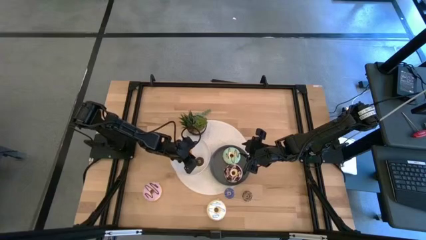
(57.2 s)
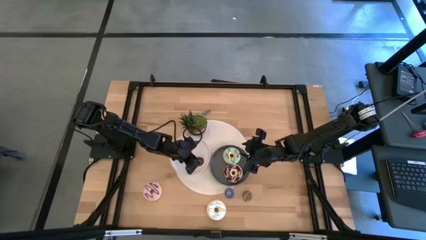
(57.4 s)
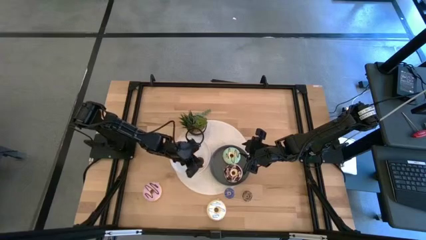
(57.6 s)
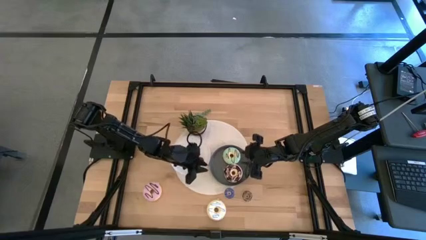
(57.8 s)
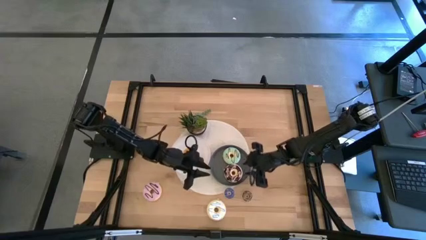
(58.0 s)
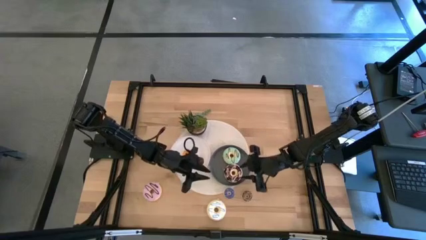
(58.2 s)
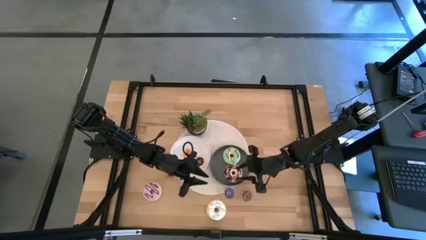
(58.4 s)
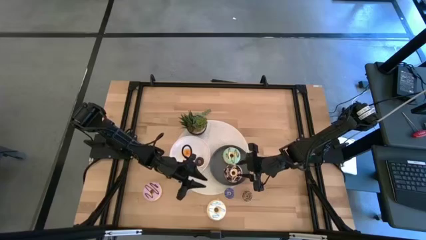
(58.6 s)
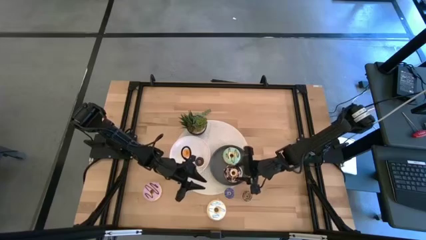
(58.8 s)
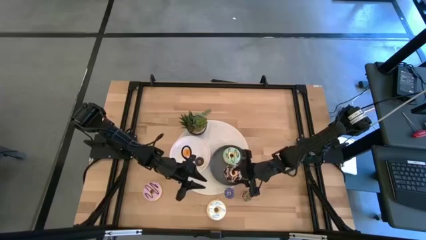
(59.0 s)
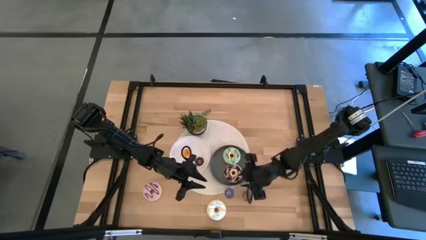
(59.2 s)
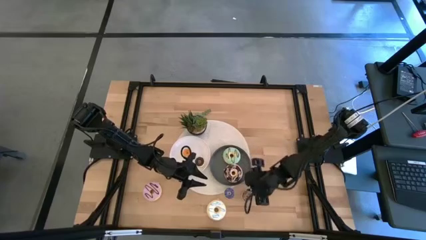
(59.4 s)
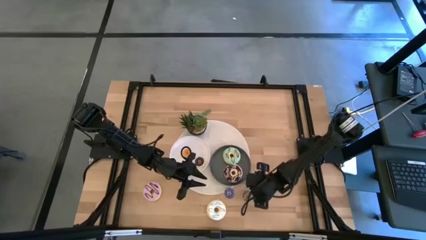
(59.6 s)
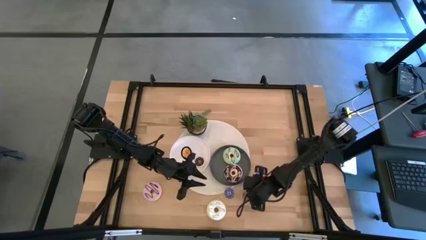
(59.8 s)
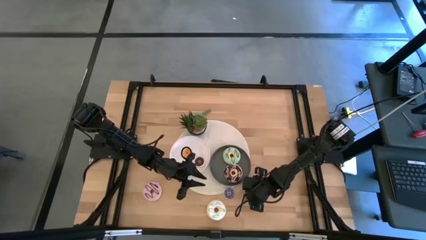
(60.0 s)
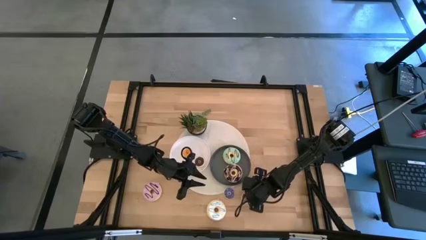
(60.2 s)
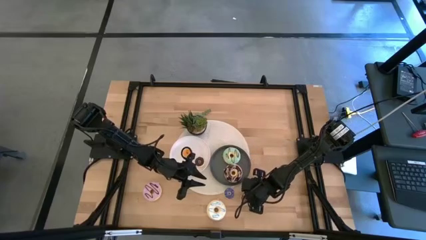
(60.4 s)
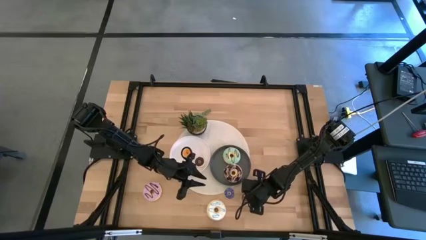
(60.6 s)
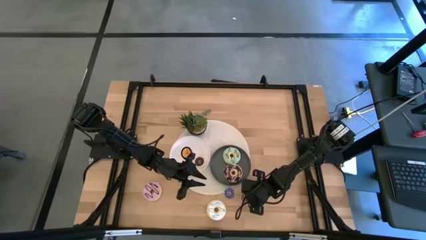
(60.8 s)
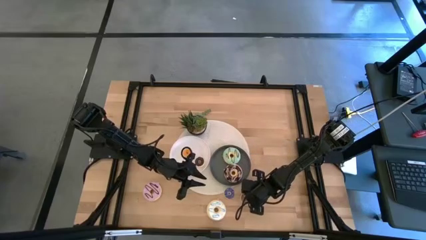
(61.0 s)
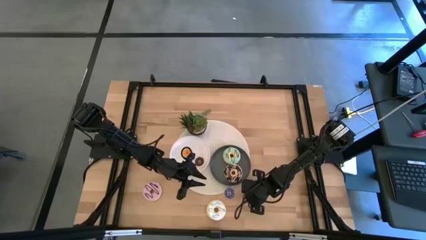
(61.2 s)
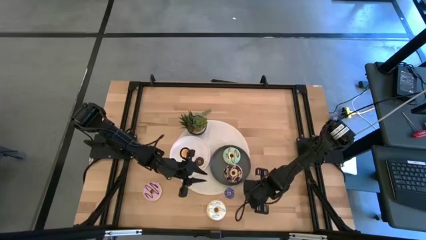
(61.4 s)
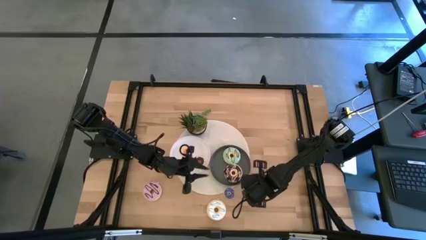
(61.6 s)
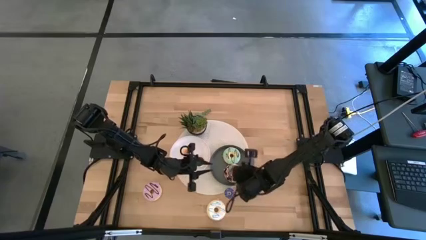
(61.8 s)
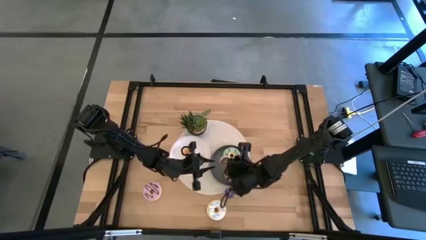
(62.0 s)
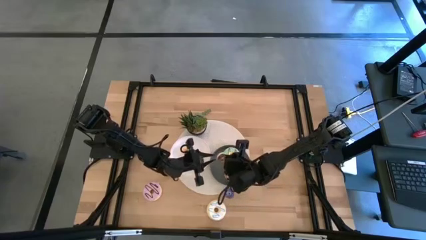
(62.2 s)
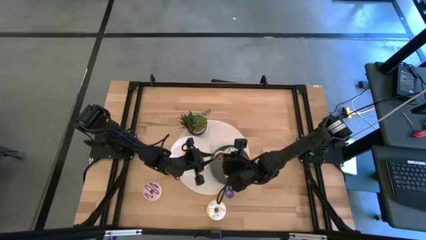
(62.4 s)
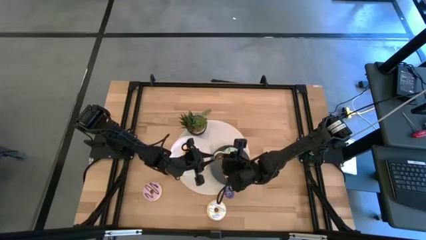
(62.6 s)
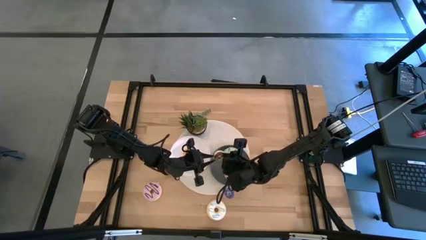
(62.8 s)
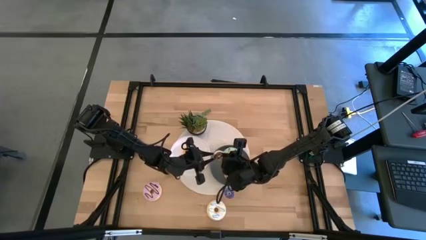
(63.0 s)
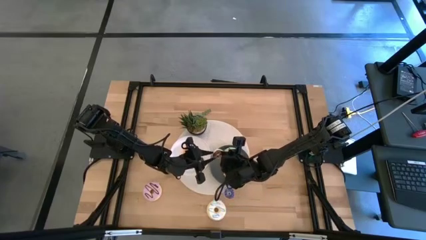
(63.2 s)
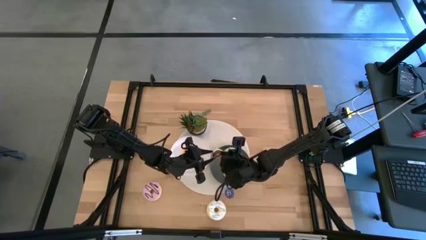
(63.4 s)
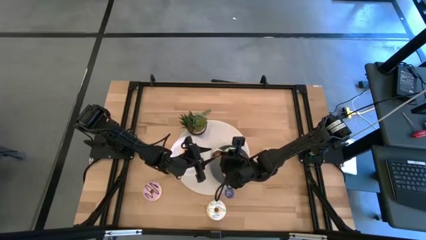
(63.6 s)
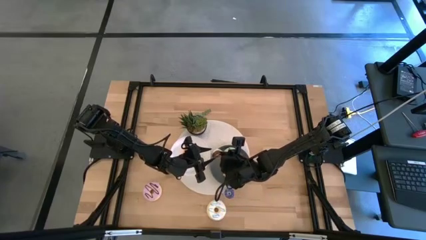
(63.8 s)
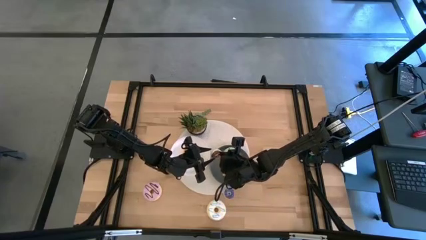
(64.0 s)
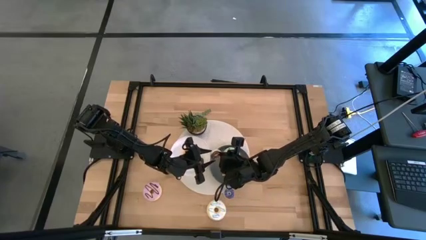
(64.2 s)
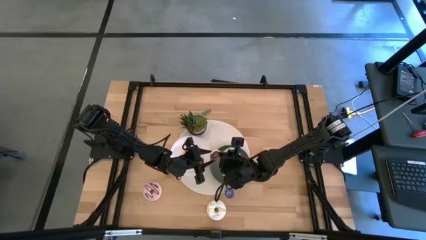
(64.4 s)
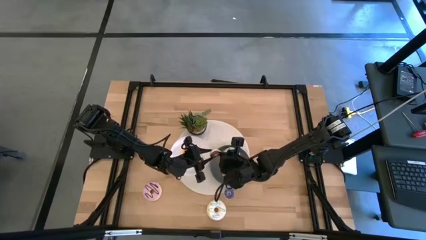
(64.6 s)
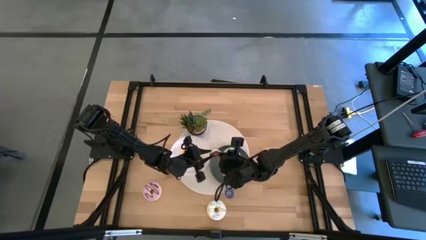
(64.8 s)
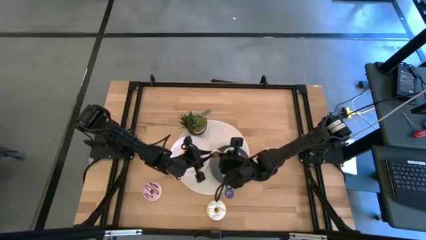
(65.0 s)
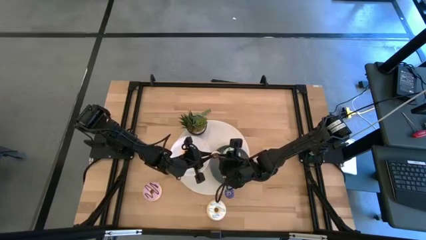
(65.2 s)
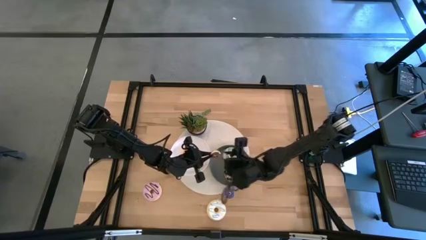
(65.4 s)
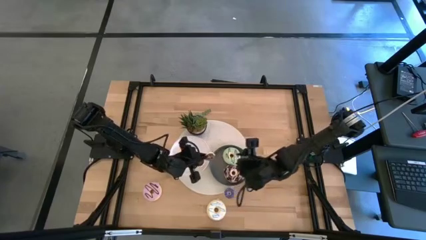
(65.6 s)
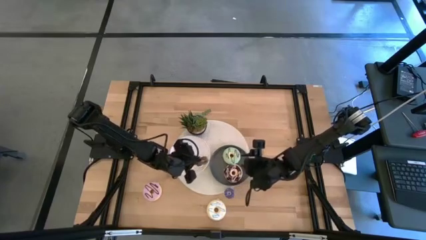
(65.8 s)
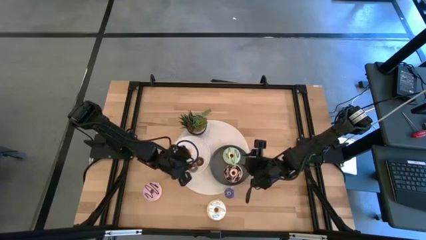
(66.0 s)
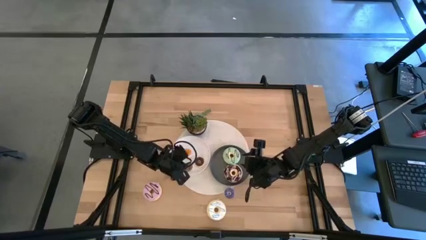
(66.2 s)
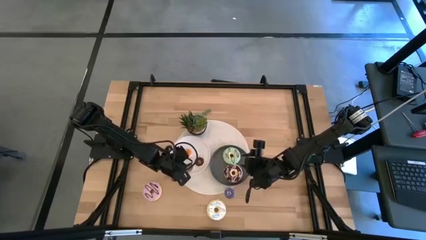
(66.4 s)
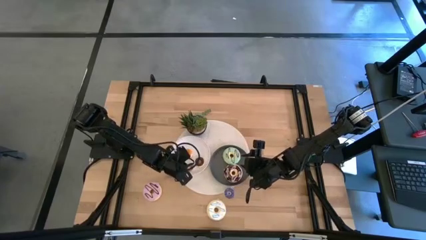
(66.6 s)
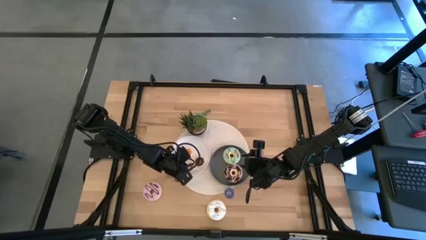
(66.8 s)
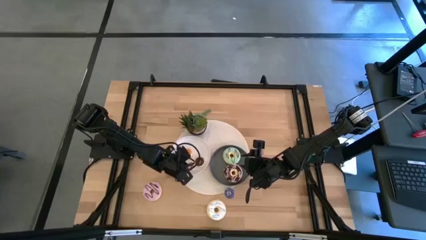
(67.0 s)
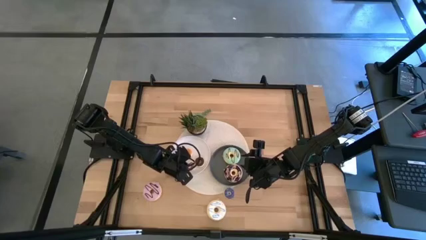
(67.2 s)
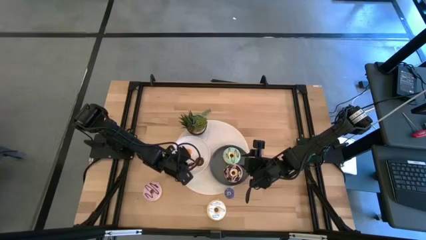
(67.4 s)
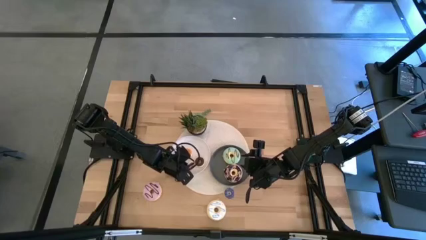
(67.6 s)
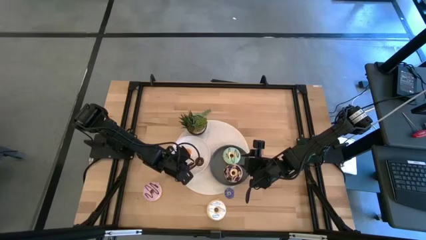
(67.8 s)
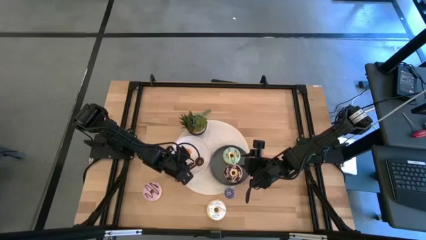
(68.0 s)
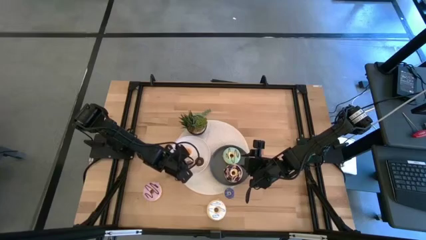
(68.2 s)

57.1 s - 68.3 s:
Task: Pick & Place donuts
Put the small brown donut on the white plate
